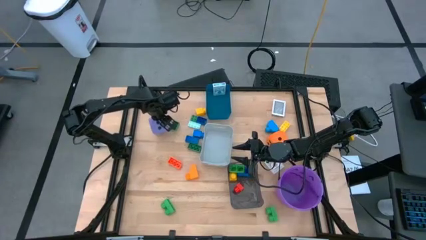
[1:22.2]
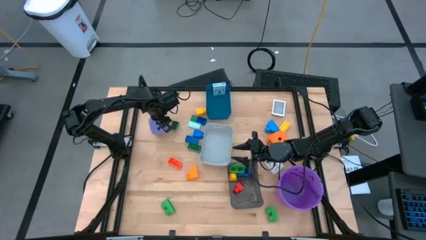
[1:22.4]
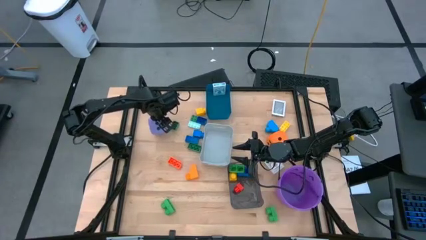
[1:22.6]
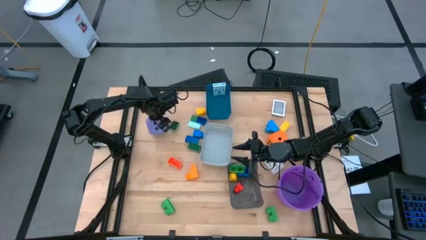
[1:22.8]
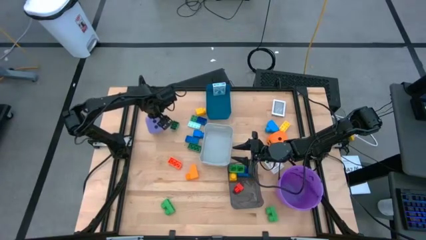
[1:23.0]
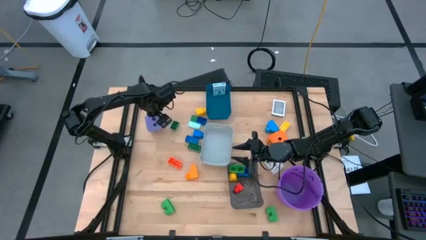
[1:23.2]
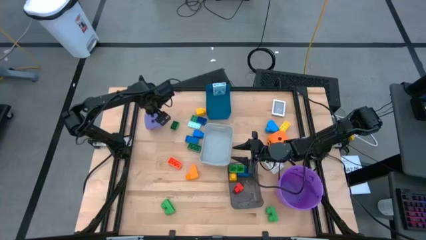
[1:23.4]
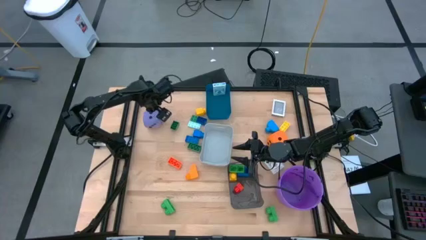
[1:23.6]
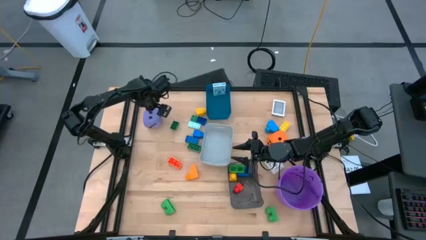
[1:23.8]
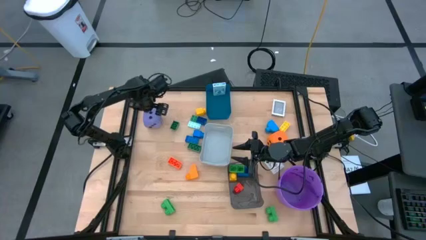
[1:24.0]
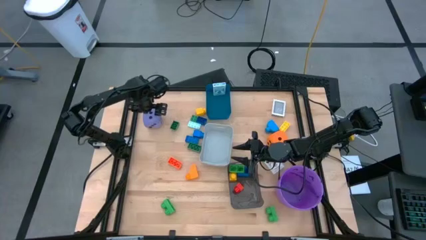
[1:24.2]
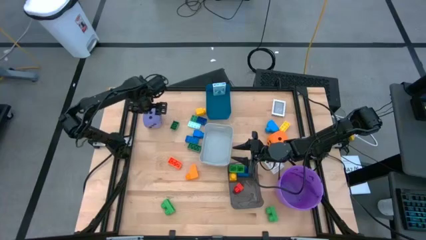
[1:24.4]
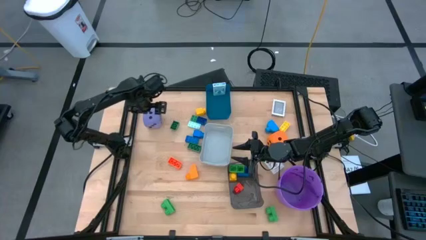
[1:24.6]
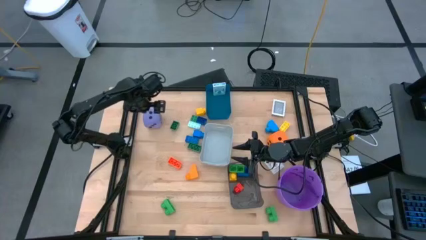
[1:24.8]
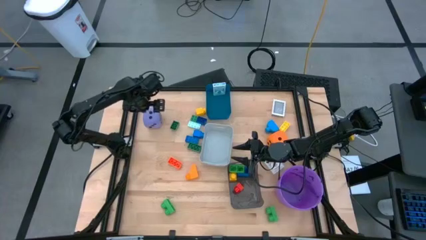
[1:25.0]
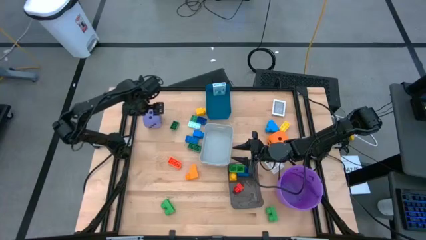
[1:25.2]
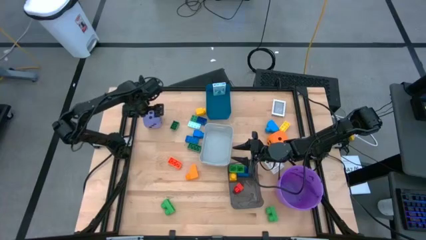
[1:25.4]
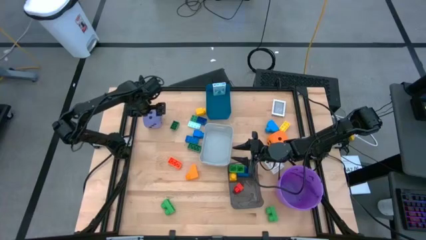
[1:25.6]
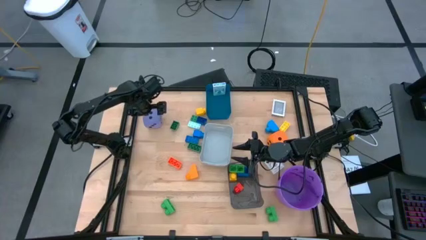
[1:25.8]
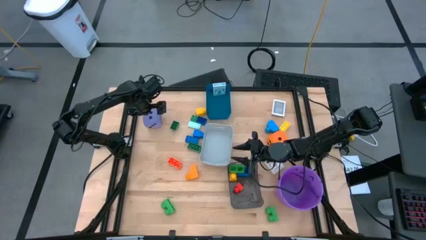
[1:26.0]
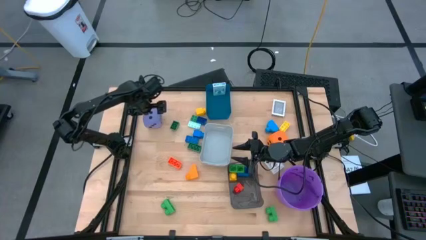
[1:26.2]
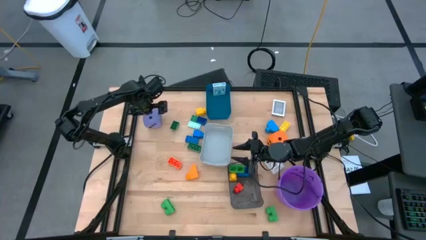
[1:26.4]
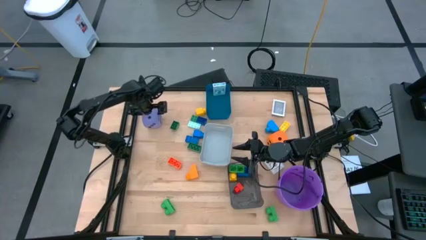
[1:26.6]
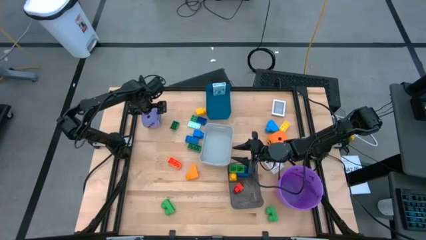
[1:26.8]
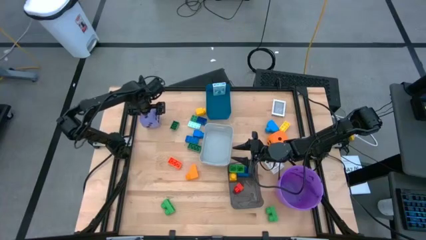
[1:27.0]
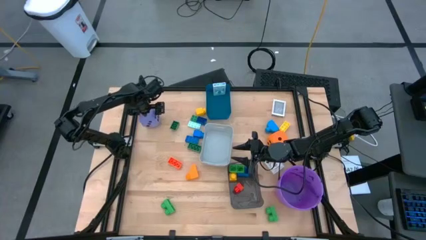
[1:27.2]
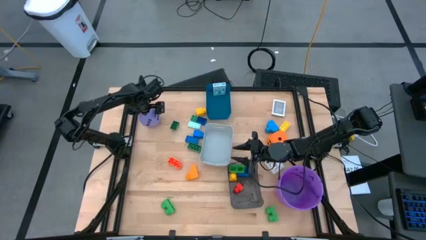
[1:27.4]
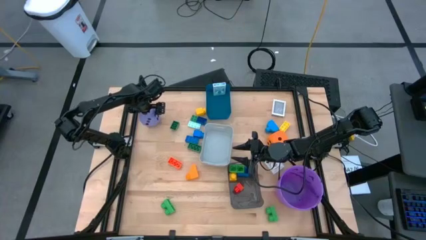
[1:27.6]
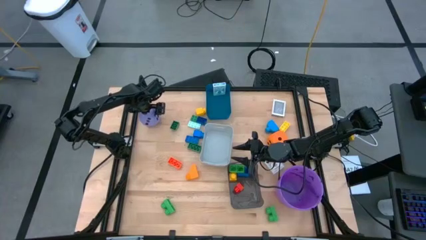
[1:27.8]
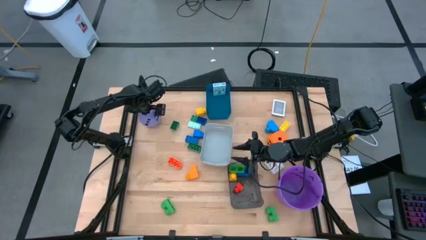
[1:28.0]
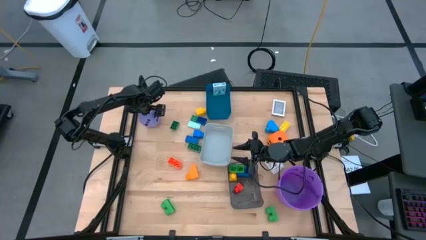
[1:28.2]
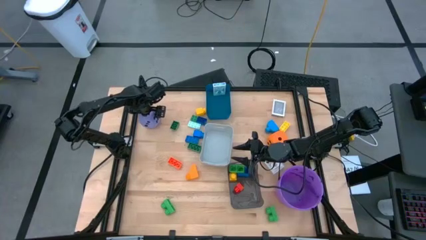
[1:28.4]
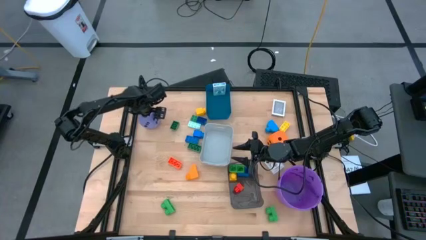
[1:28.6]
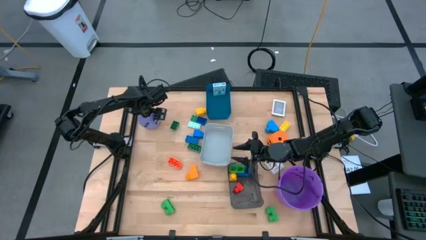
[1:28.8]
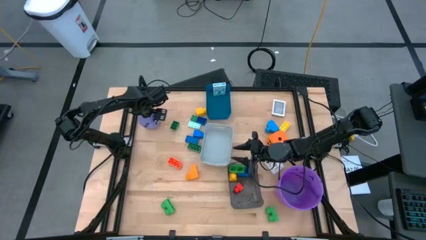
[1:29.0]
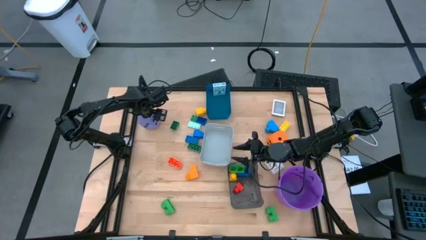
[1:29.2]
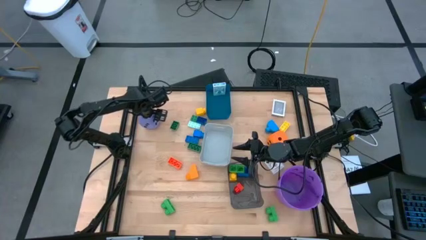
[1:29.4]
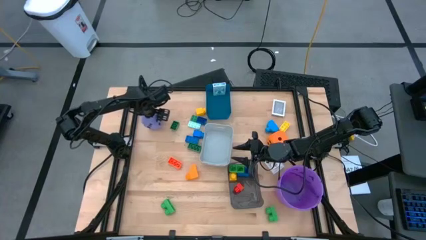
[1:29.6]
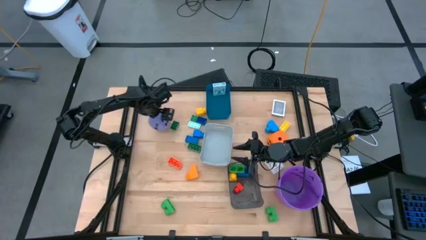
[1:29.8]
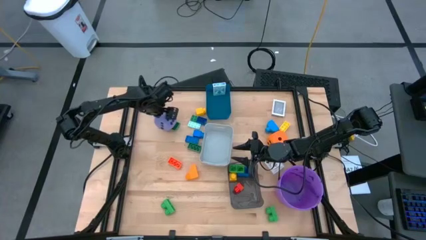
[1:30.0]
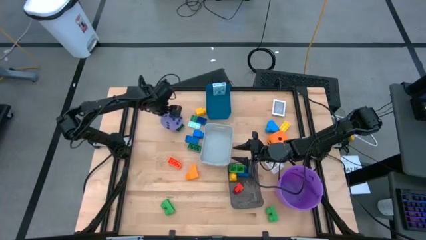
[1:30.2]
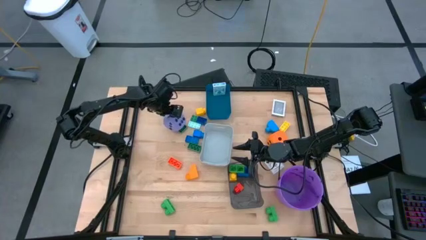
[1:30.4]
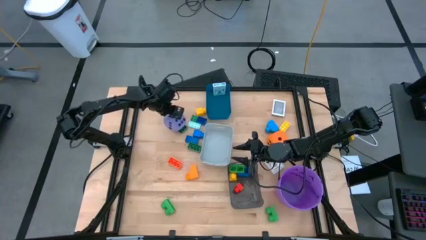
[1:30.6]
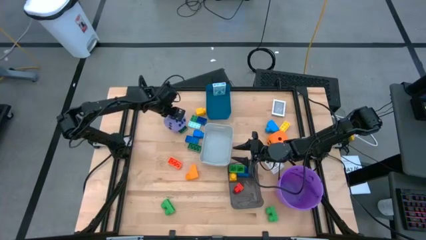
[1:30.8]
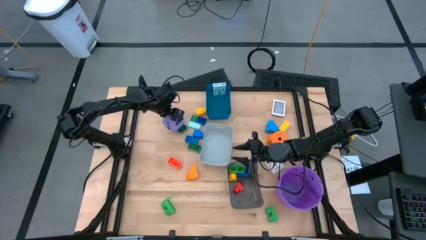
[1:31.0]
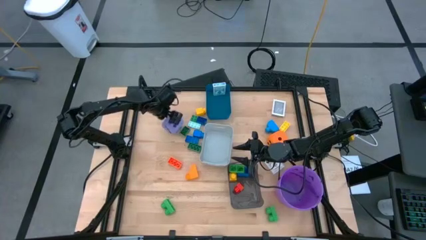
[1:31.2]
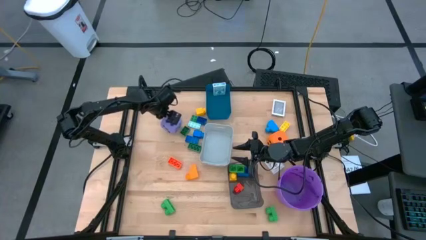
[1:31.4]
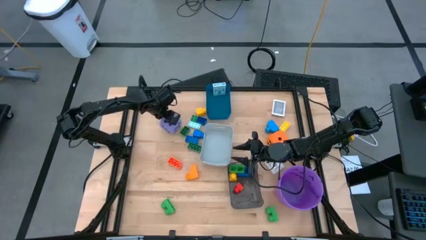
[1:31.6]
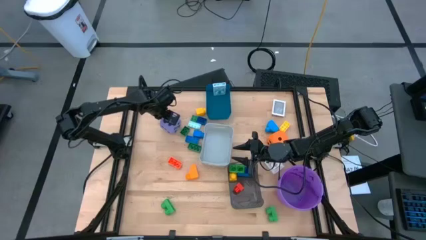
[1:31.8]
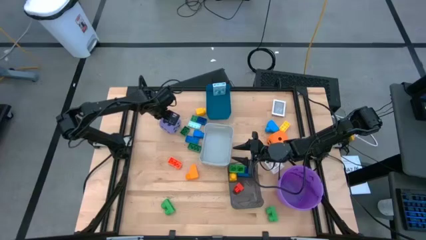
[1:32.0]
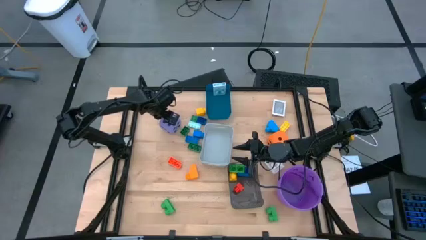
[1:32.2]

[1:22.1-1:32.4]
Task: Pick & Place Toys
Put the purple dice into the white bin

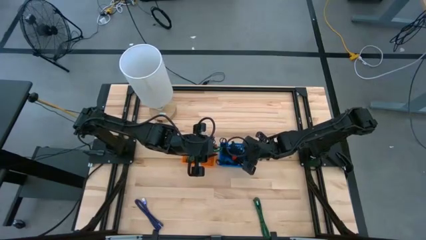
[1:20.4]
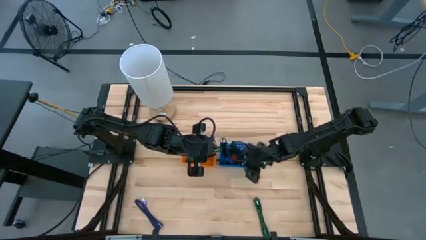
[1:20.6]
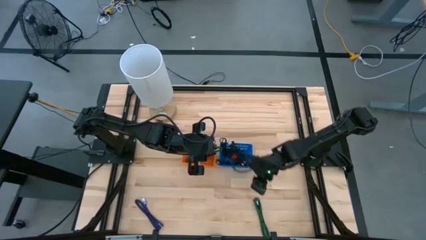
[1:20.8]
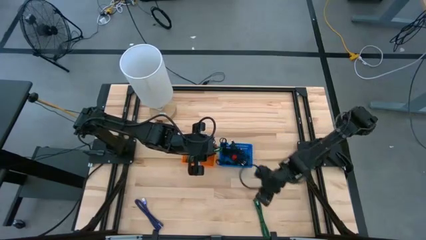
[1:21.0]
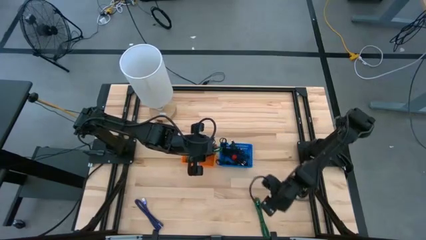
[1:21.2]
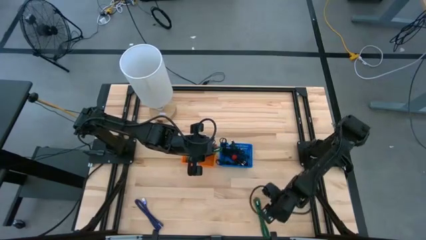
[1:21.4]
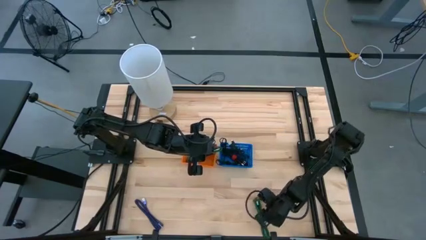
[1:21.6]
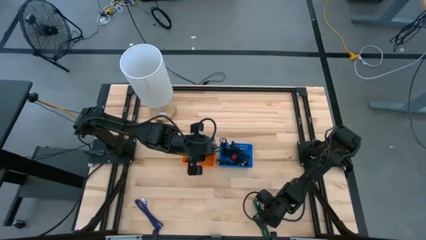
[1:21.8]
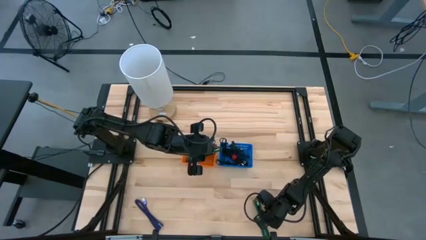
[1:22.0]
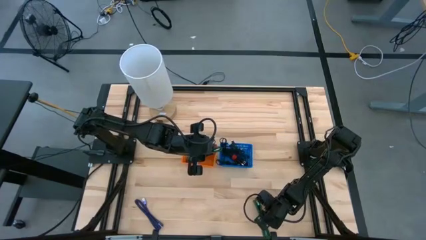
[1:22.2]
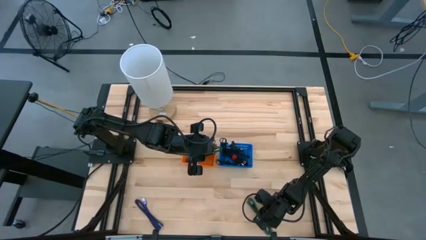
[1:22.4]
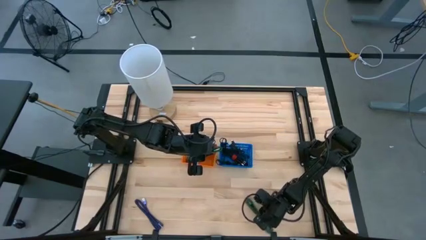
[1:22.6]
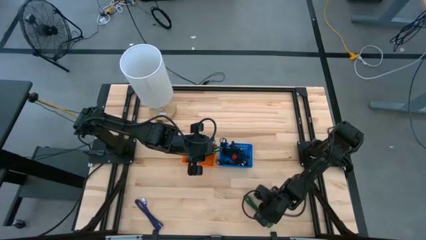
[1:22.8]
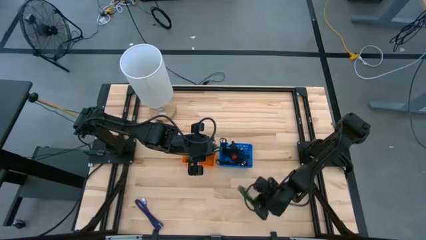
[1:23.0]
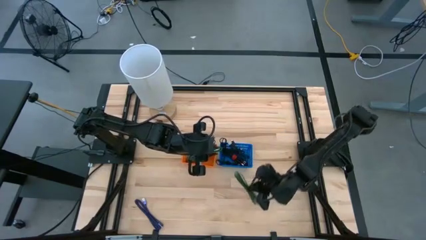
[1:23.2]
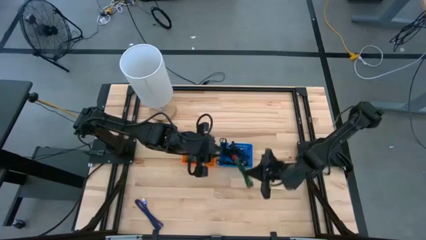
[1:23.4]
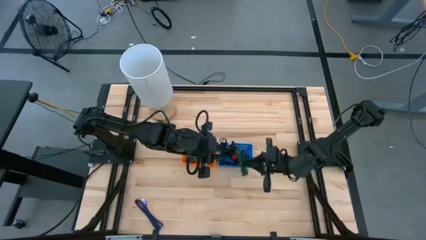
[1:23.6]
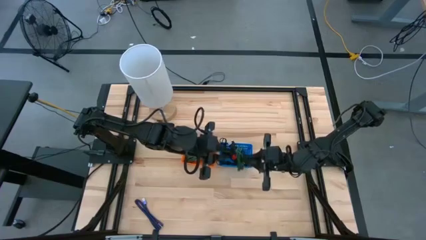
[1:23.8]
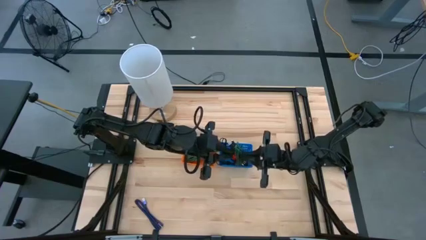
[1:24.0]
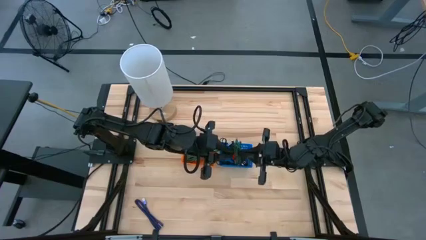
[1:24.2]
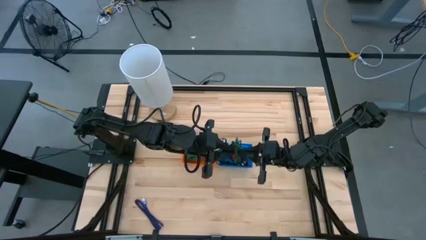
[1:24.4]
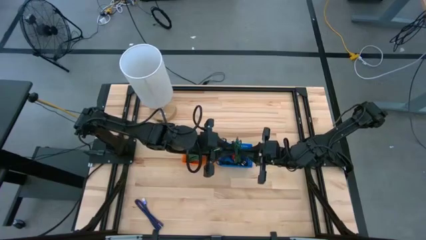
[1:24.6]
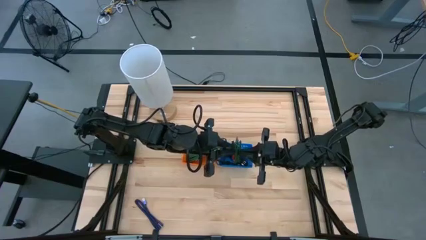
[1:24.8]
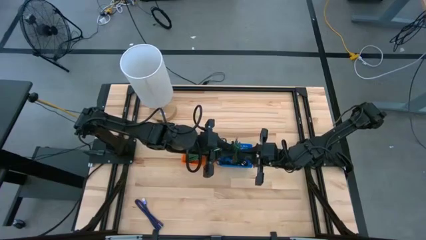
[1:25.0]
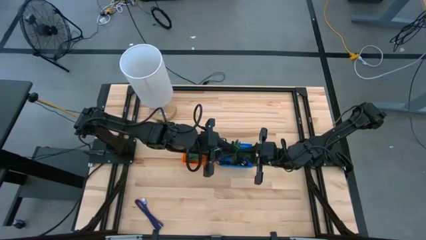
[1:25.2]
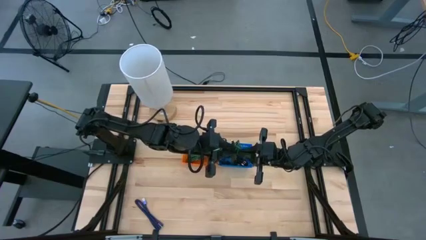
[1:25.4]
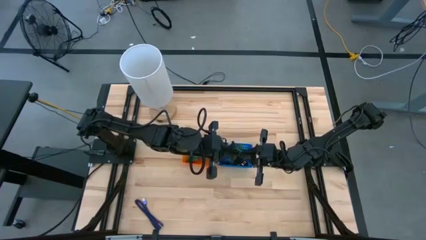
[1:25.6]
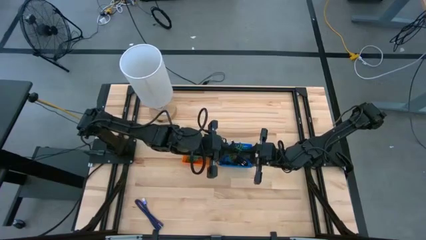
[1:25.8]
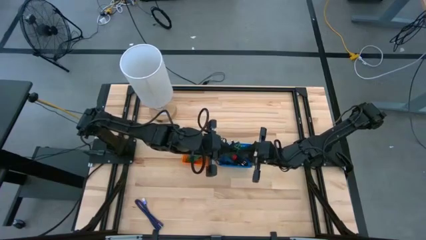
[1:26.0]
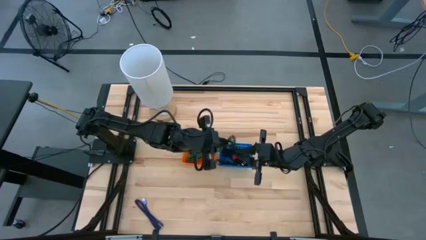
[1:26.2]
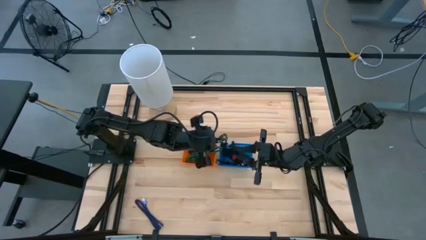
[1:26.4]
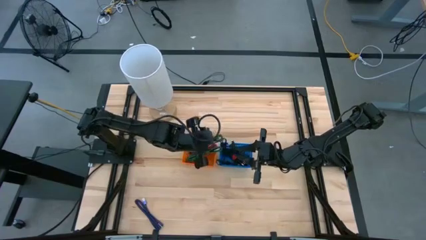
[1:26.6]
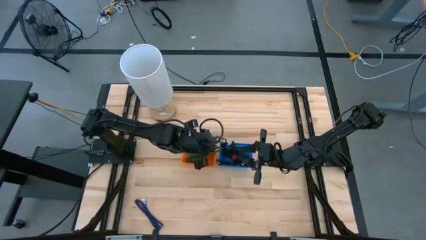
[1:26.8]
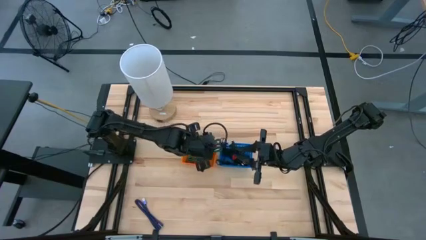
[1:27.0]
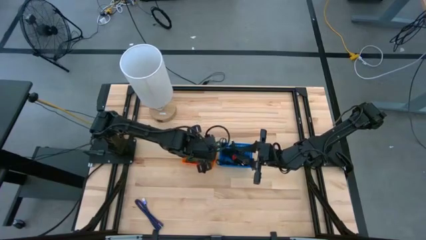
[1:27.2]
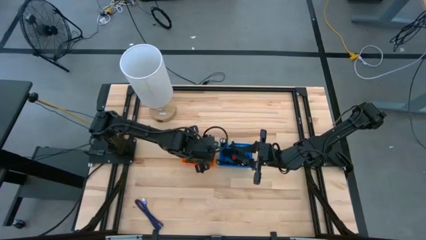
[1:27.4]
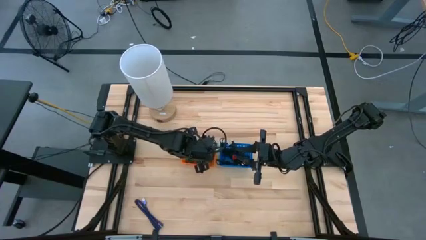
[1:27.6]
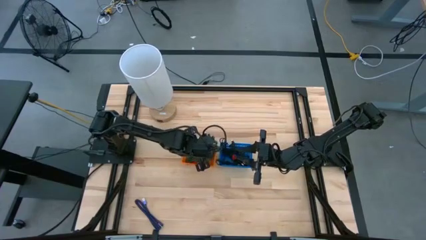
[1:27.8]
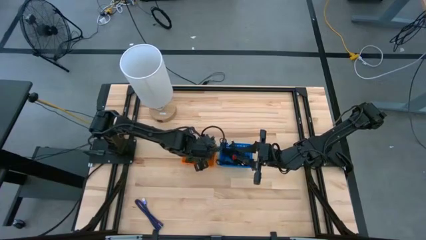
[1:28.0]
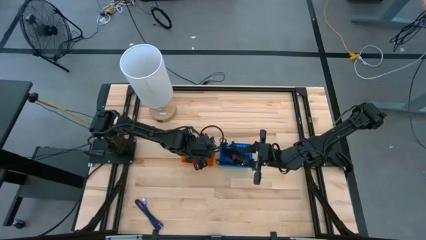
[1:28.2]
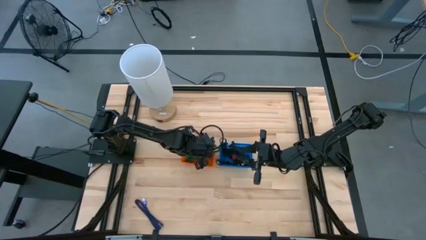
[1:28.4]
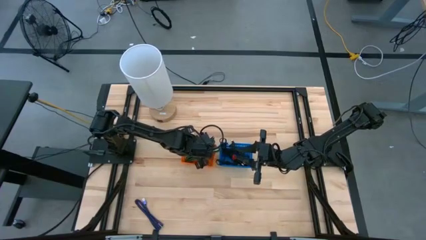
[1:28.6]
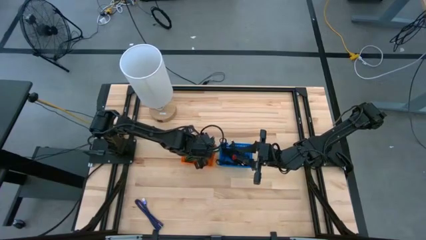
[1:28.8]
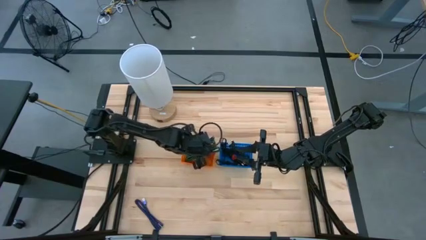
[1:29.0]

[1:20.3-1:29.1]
Task: Pick & Place USB Port
Put the green charger cable into the orange bin
